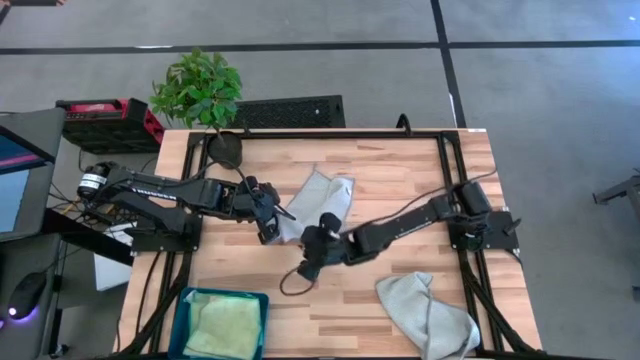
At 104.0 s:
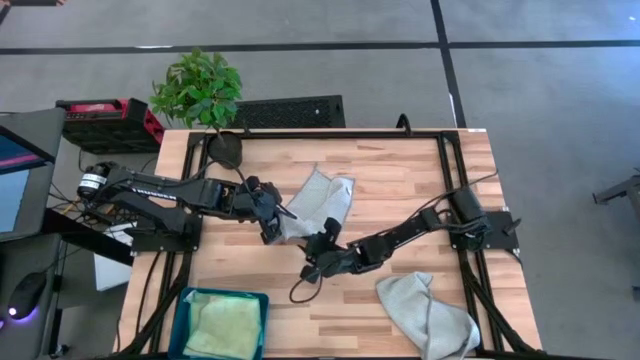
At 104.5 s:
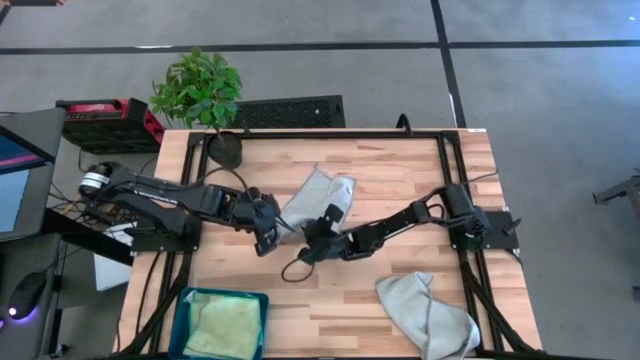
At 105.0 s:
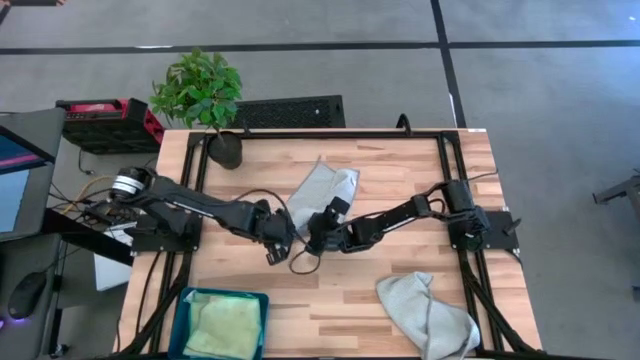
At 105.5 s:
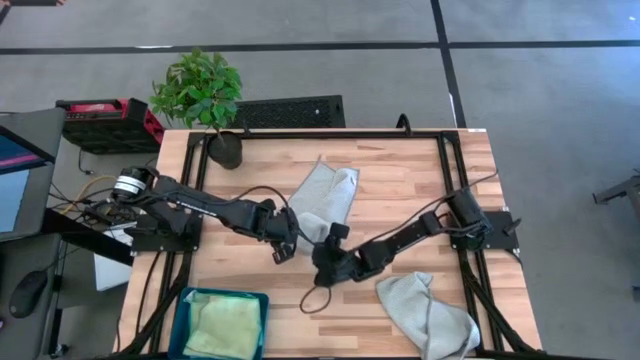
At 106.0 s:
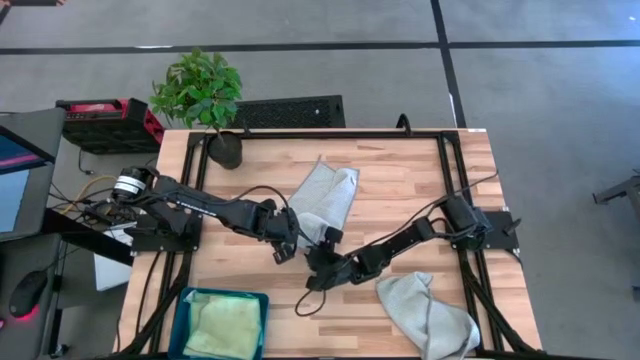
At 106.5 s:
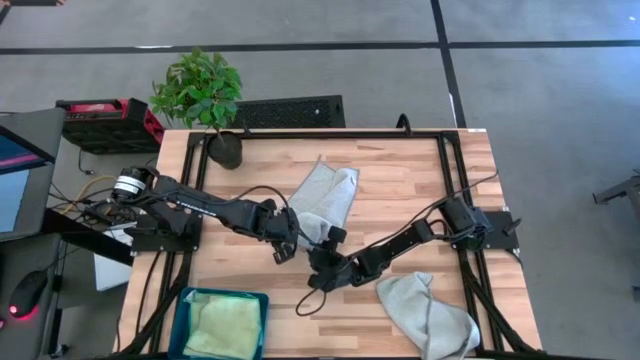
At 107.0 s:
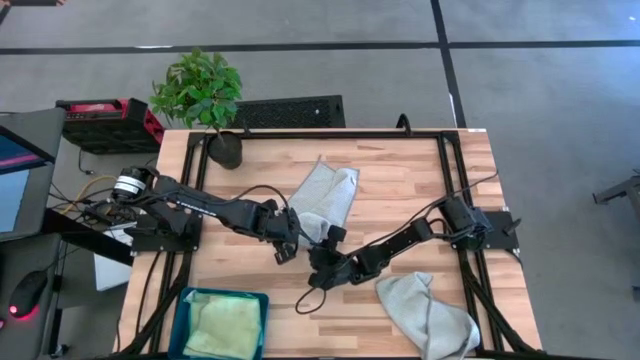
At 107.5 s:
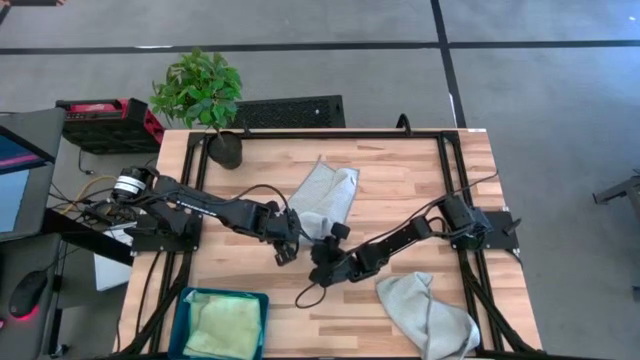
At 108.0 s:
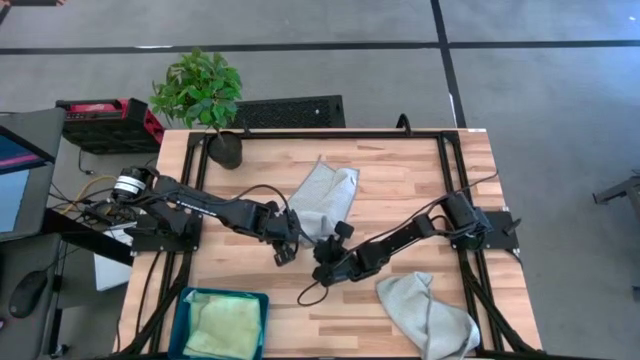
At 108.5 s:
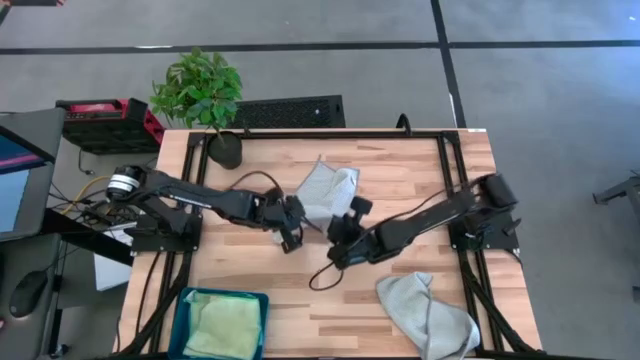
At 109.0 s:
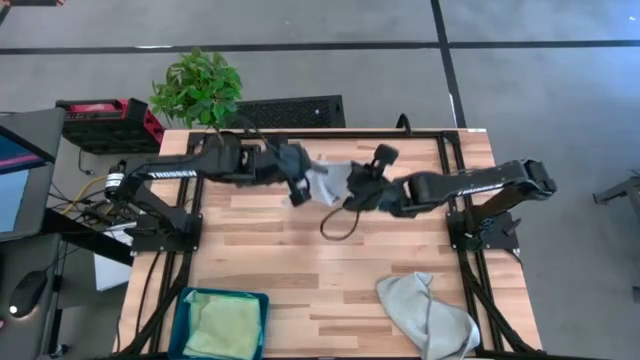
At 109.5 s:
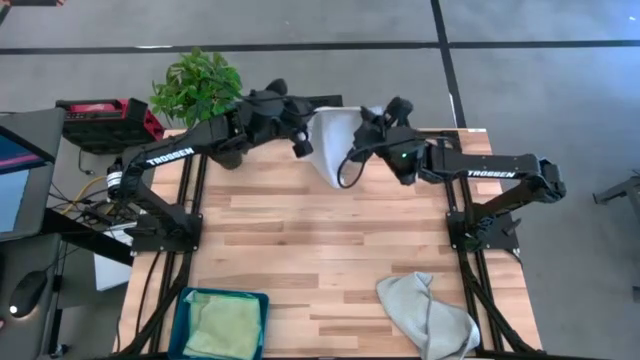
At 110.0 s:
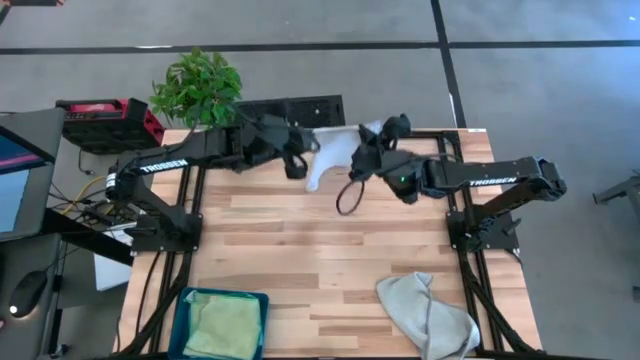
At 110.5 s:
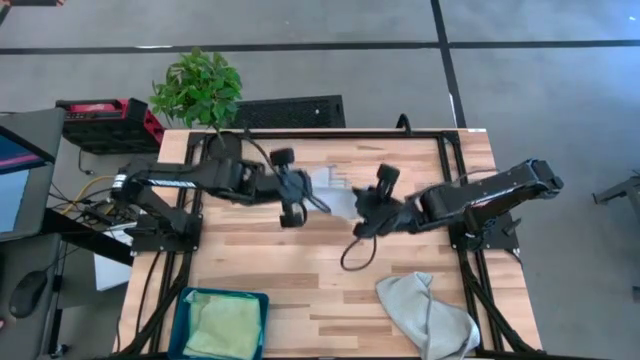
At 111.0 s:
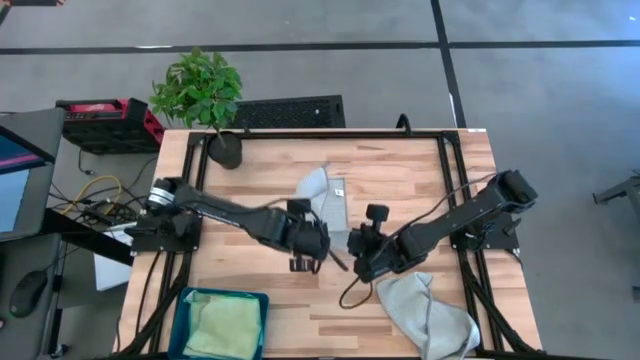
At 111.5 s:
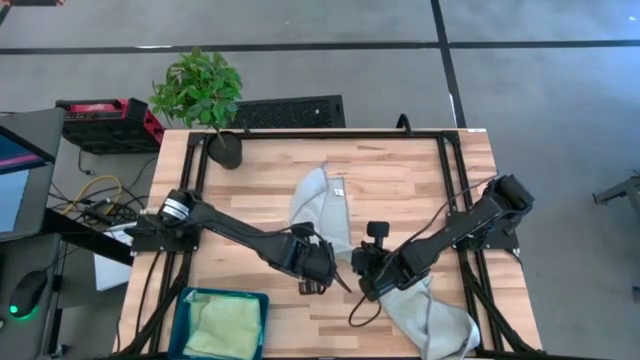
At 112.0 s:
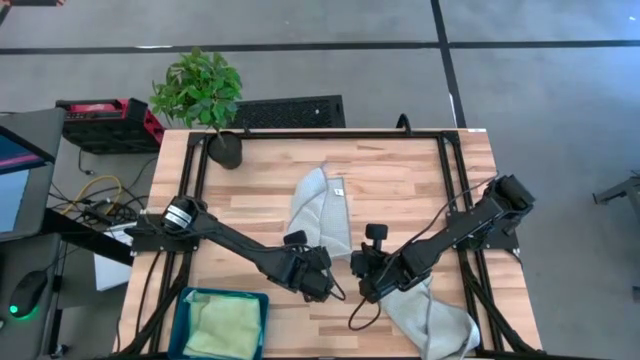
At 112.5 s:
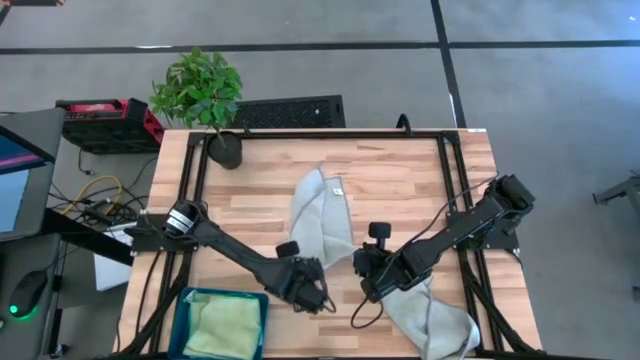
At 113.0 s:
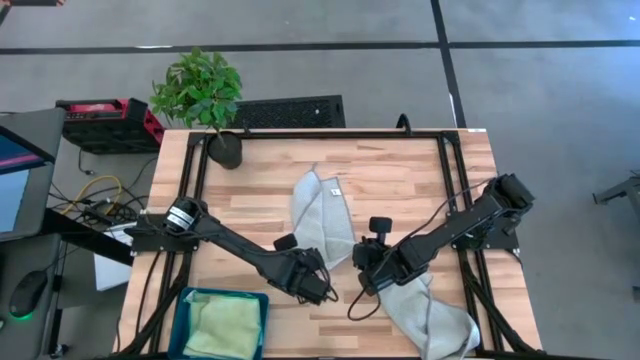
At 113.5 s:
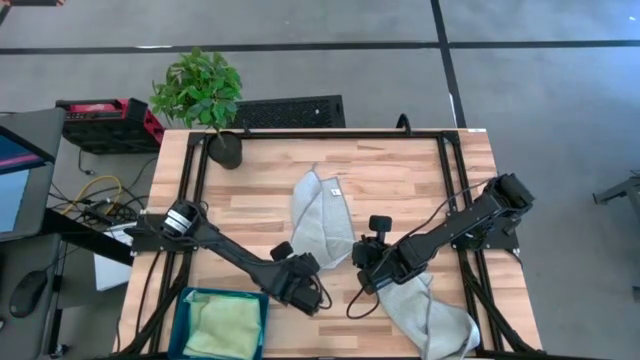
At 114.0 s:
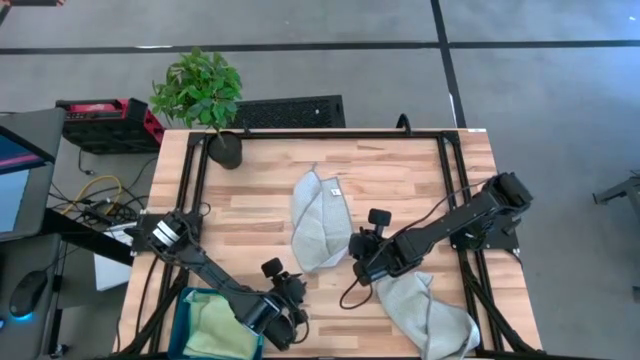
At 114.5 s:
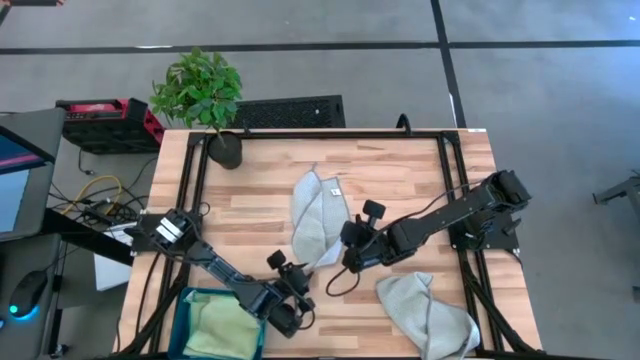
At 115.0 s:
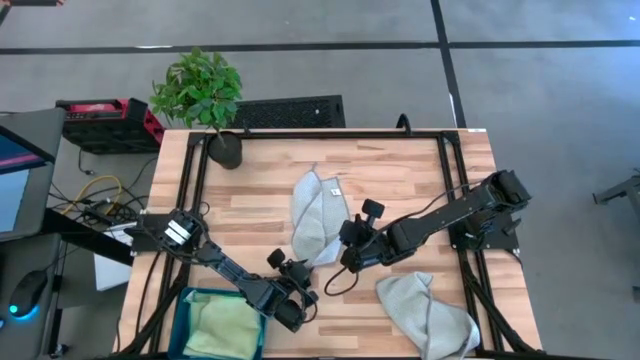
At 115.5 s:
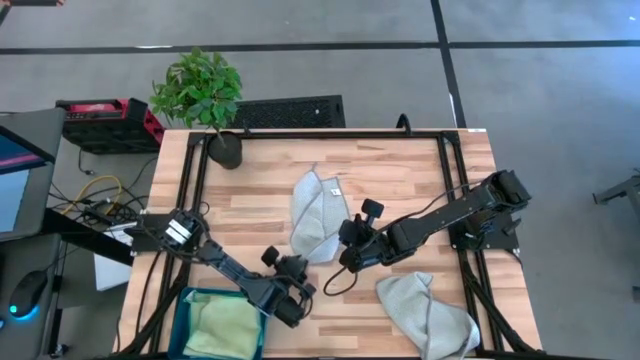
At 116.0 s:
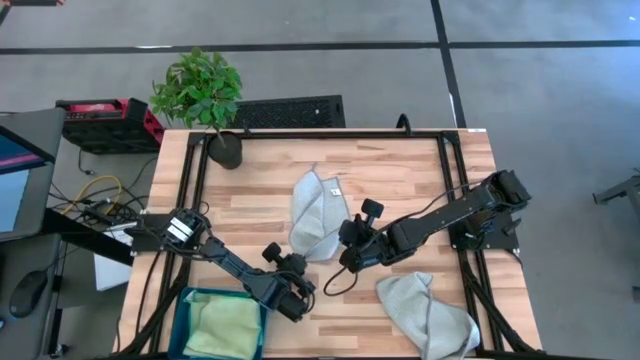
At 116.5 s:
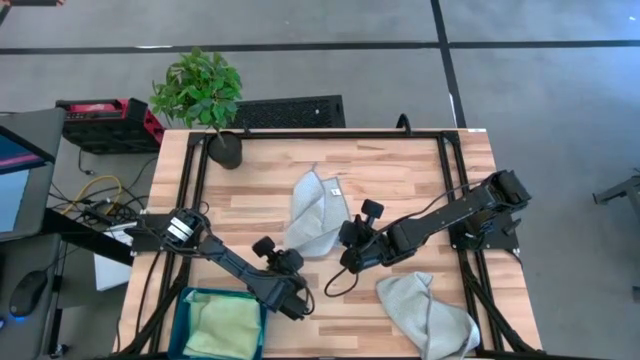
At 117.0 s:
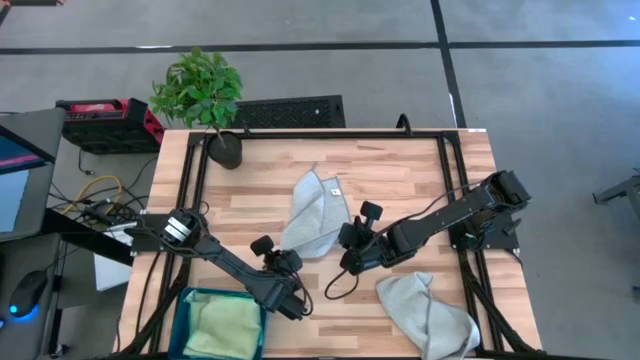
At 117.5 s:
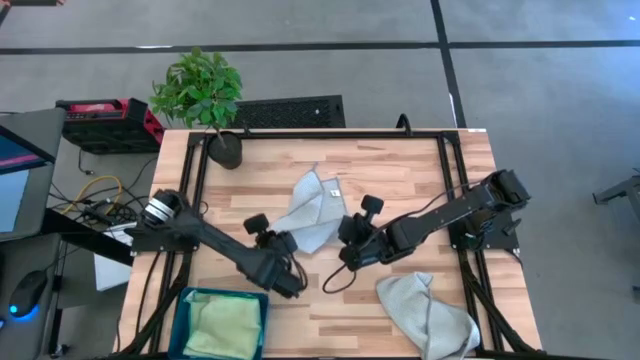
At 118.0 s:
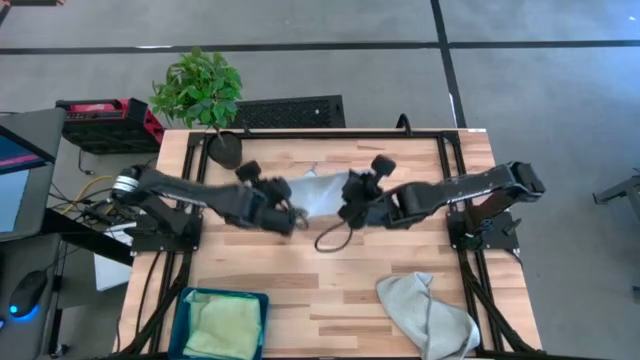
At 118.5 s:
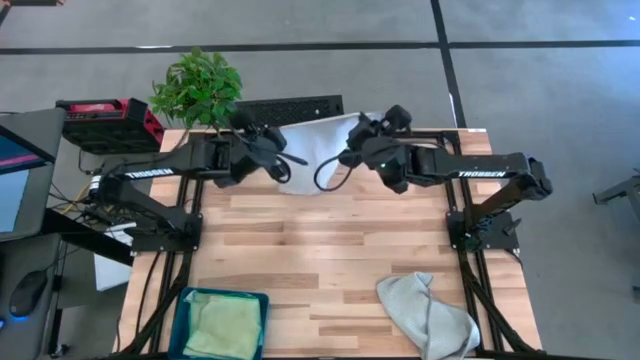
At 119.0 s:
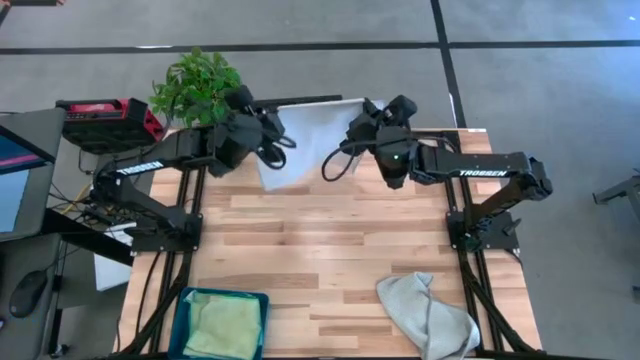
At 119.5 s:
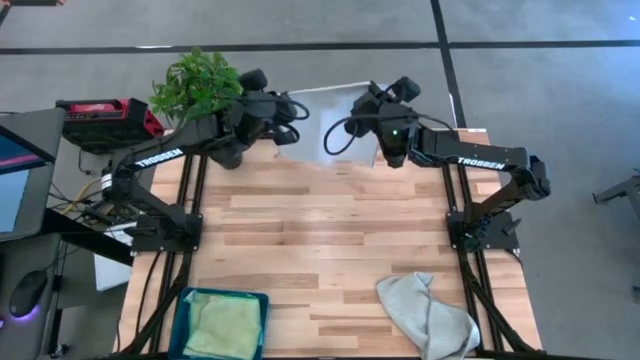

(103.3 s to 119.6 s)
Task: Fold microfiber towels
Fold the top grey microfiber cloth

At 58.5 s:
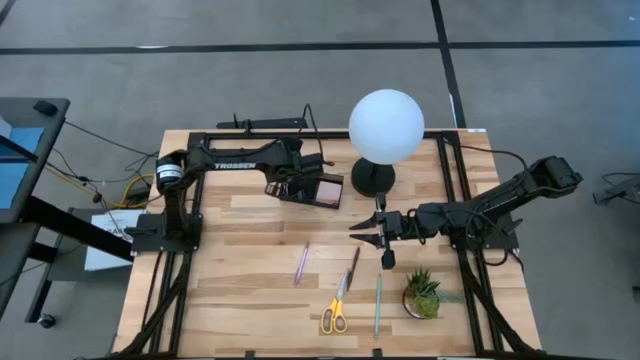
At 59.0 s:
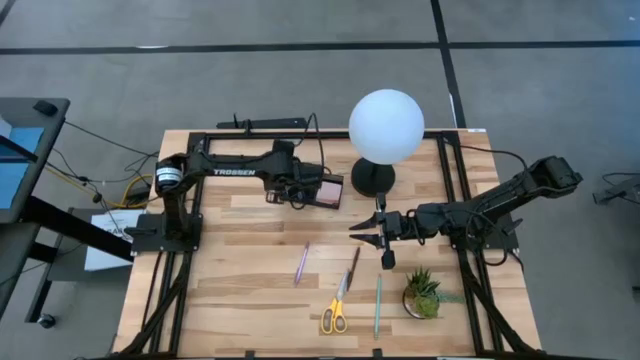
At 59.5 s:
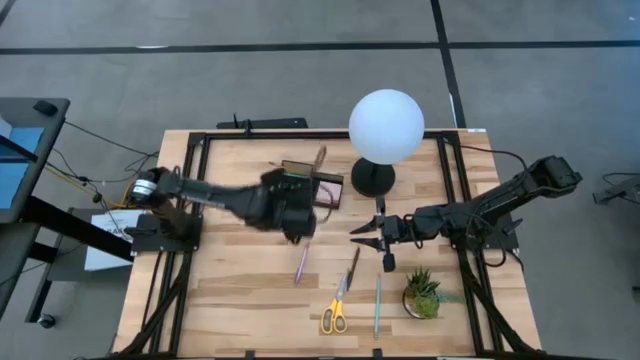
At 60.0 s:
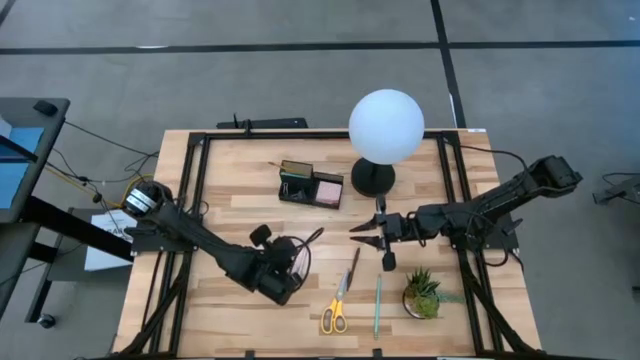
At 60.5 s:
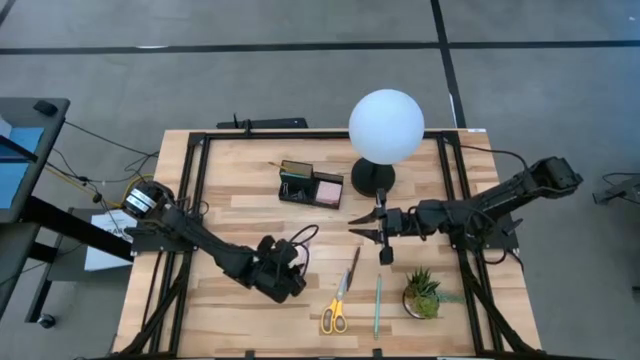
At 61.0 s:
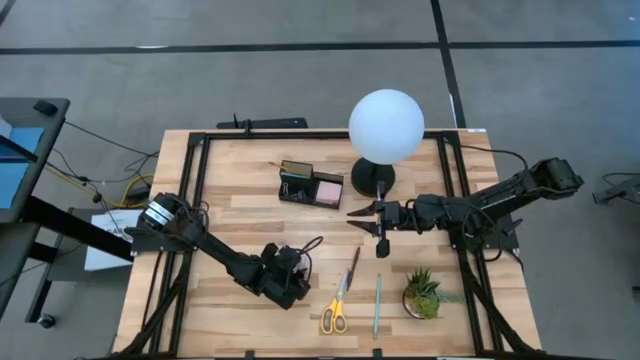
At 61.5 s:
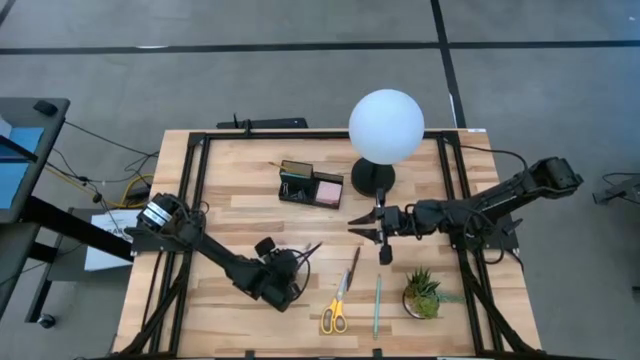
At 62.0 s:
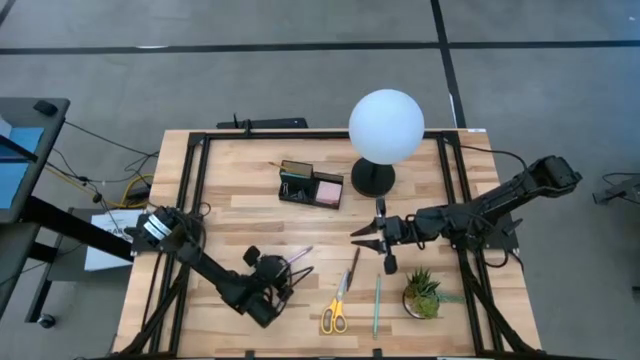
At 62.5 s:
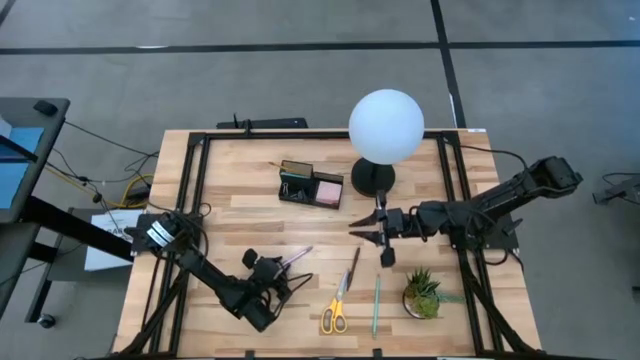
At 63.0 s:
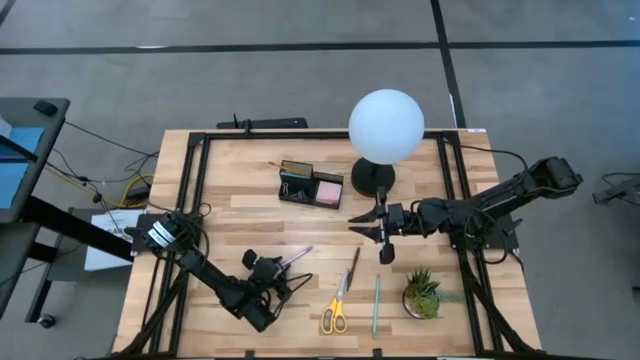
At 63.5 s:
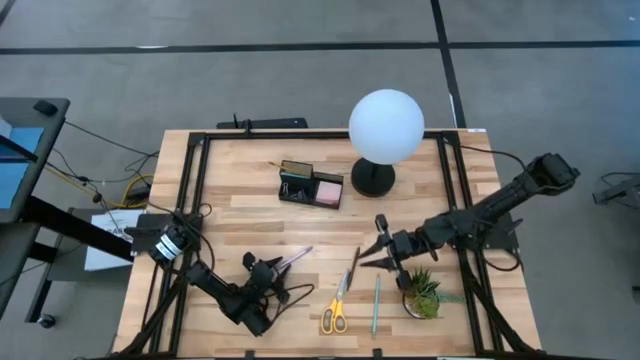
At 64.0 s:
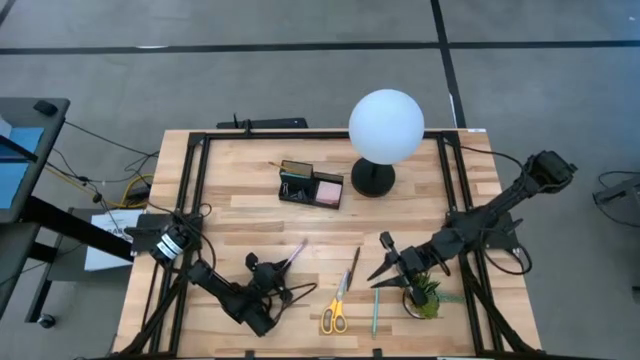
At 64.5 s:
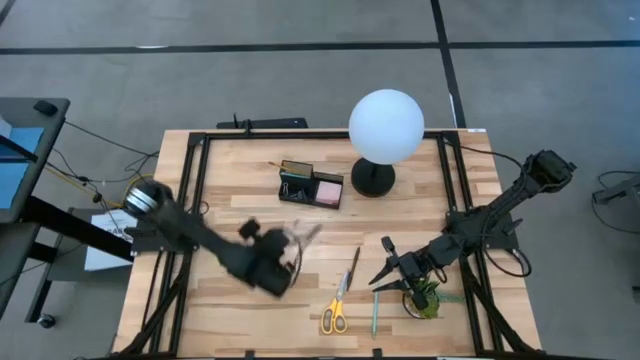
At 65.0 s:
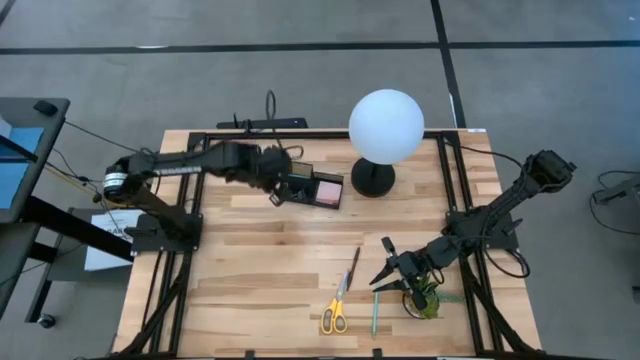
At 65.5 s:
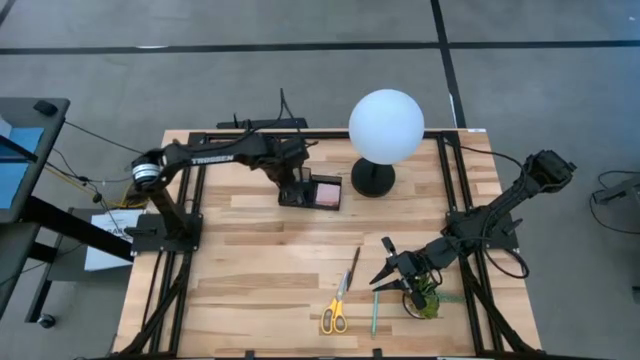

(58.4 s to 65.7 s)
Task: Pick and place office supplies into organizer
Put the purple pen into the black desk organizer
